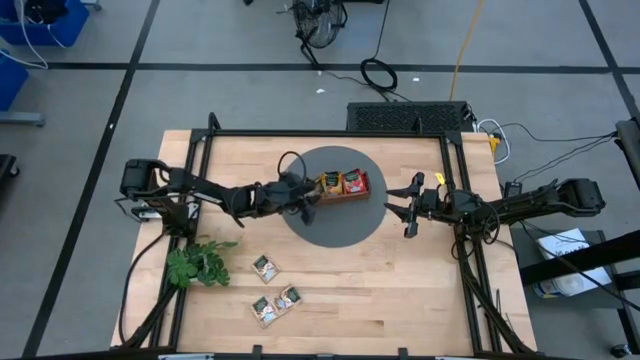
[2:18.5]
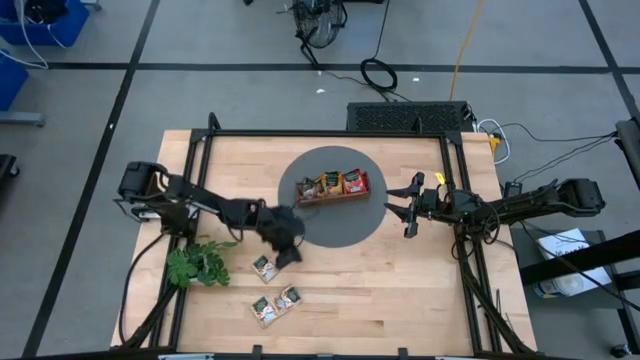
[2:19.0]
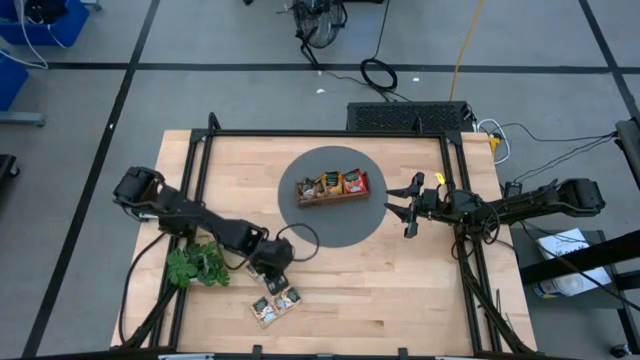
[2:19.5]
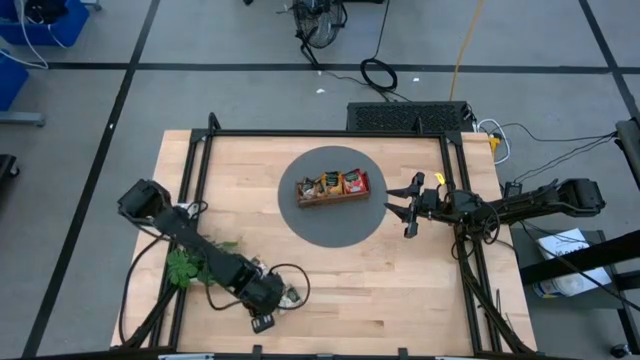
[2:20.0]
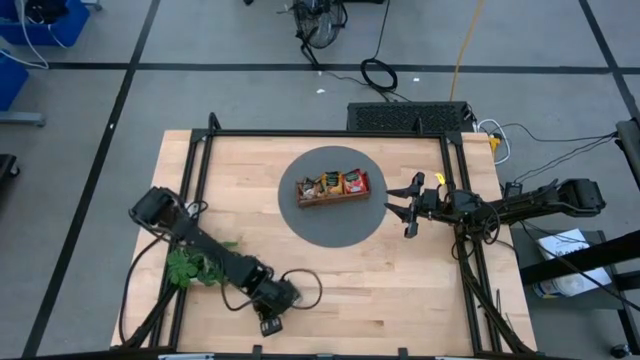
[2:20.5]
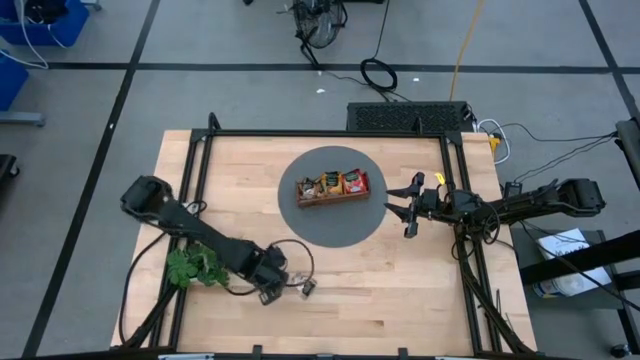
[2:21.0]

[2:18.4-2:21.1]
Task: Pick & Place Tea
Adjust the brown tea bags

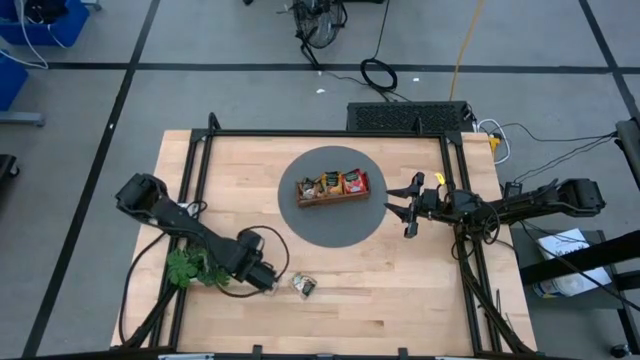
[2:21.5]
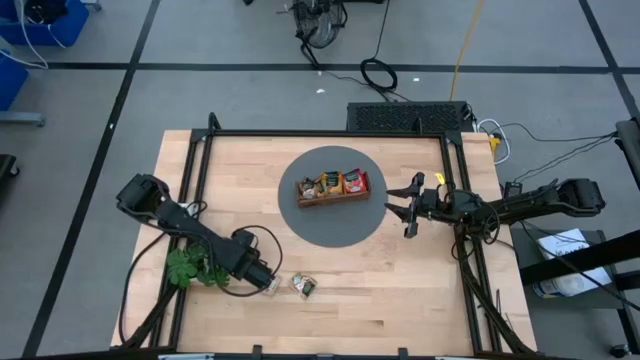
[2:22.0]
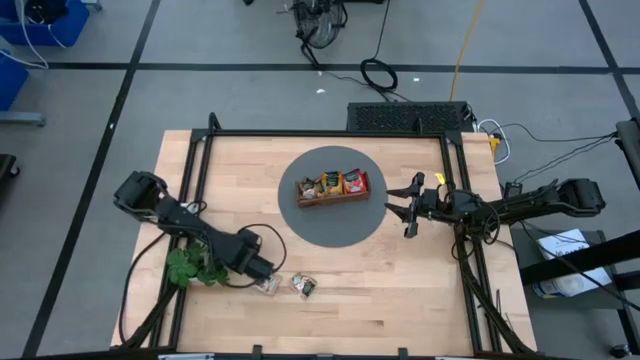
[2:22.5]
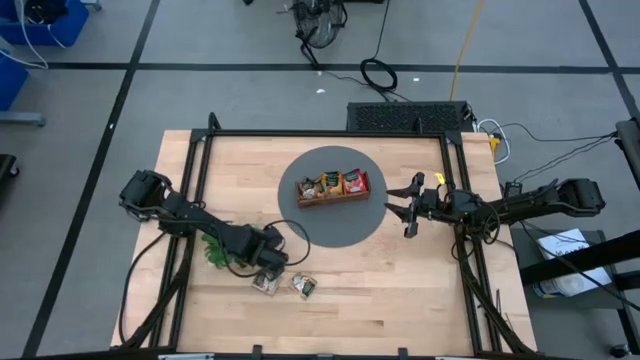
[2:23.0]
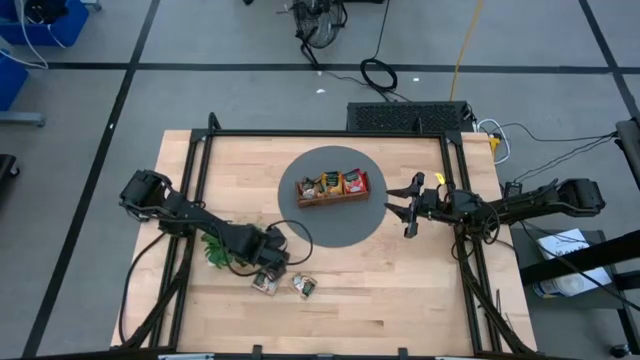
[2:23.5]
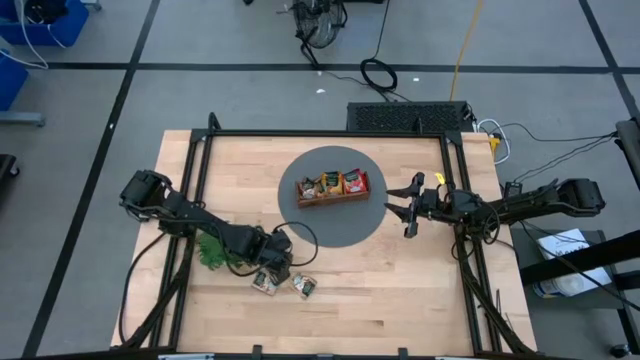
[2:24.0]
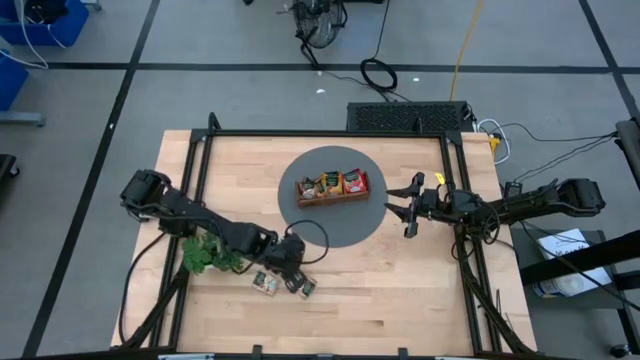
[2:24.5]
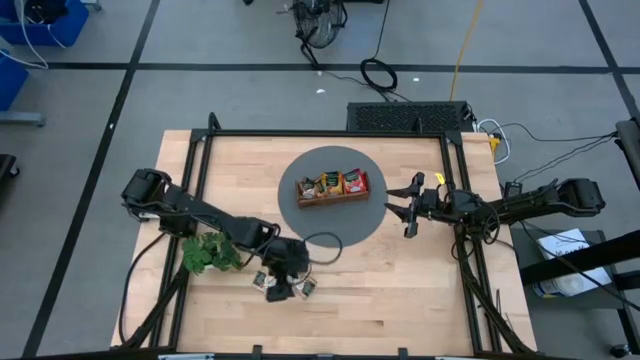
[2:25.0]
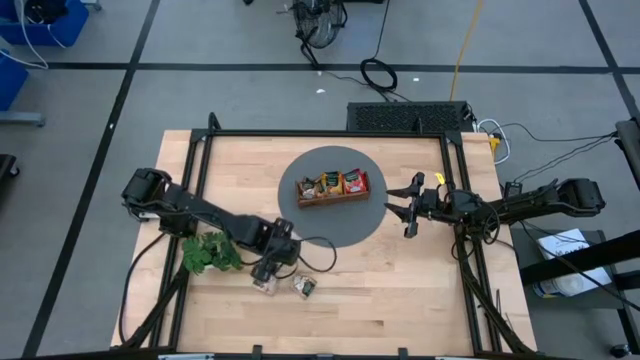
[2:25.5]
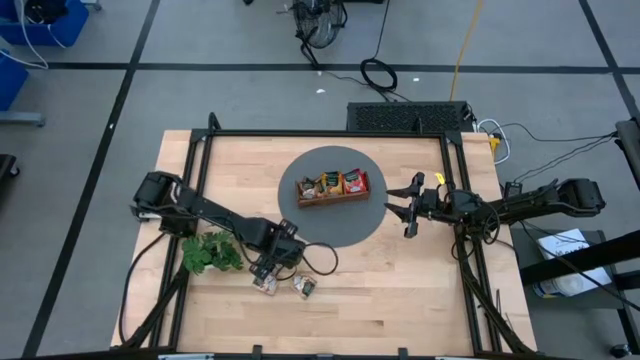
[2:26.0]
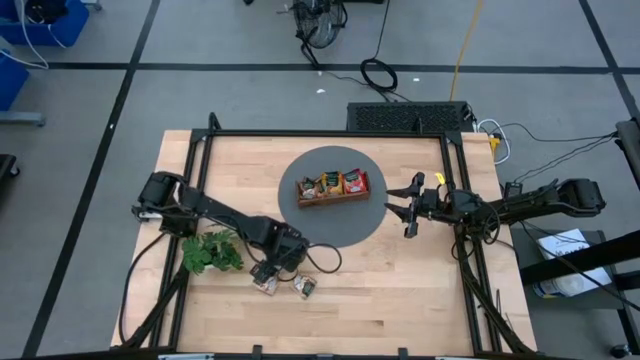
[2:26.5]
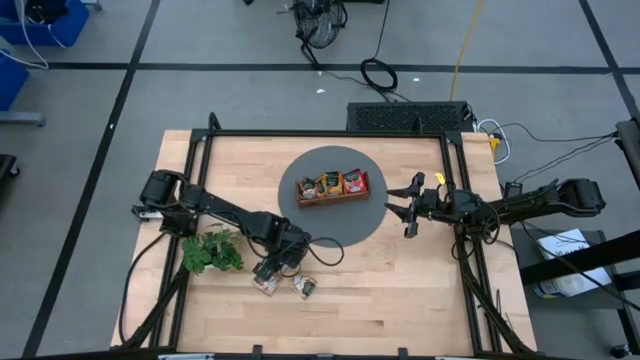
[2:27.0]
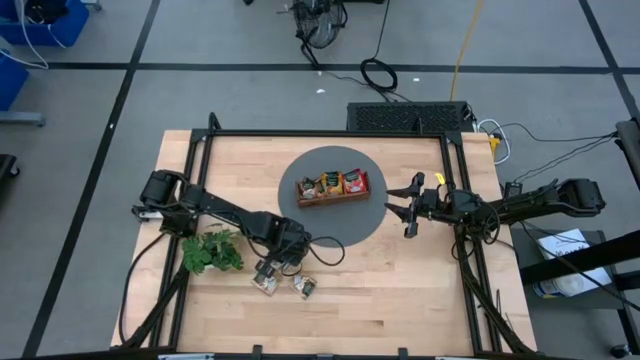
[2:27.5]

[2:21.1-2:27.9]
Put the brown tea bag into the left section of the wooden organizer

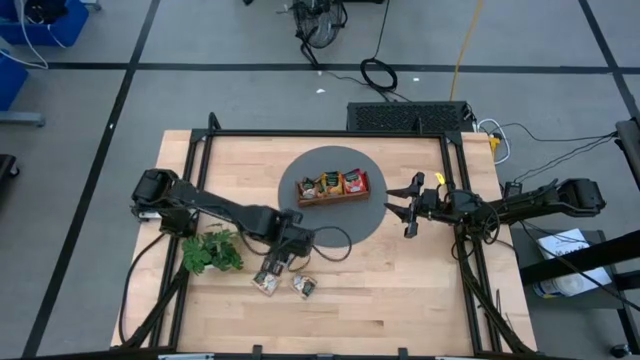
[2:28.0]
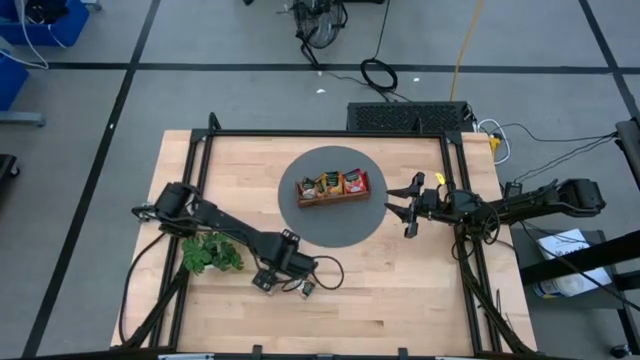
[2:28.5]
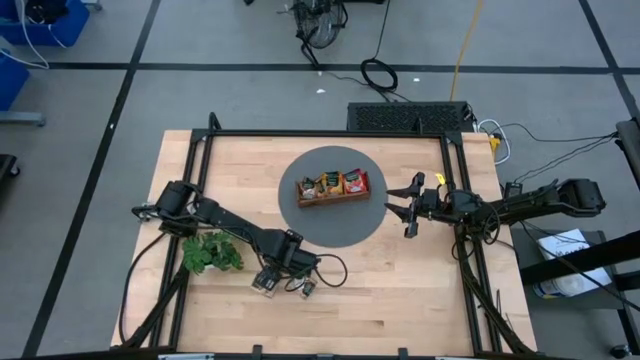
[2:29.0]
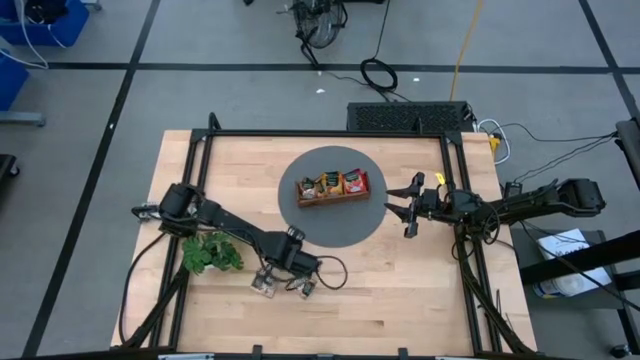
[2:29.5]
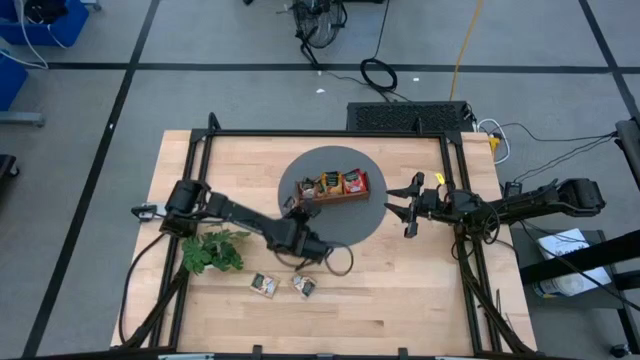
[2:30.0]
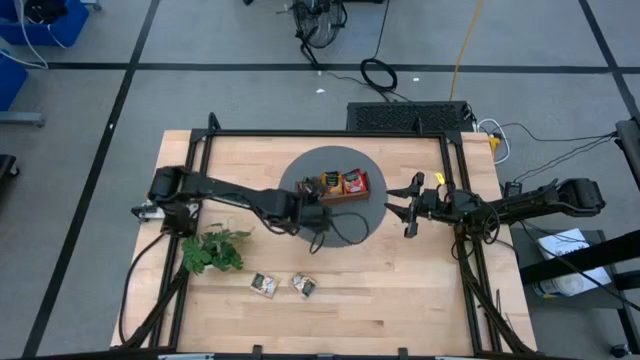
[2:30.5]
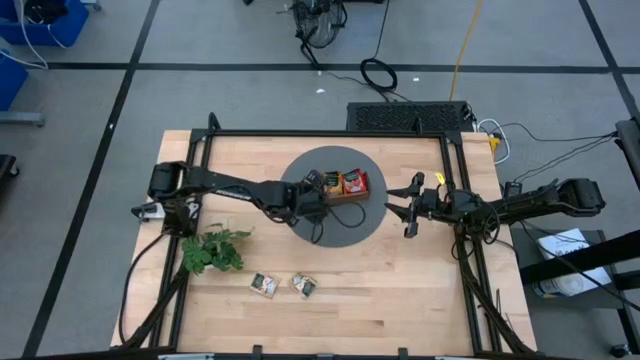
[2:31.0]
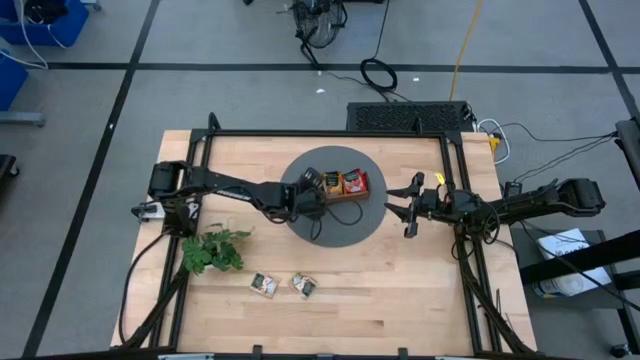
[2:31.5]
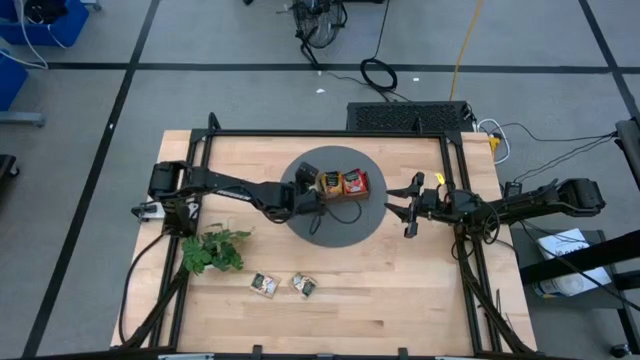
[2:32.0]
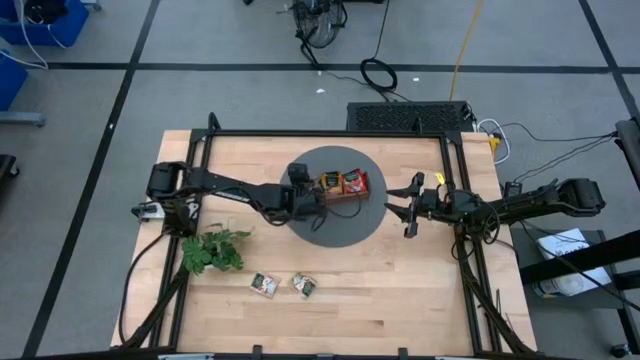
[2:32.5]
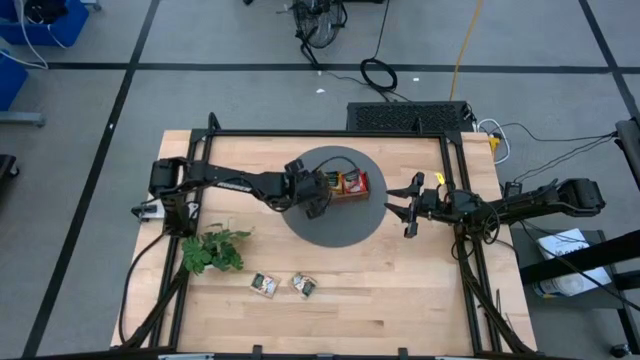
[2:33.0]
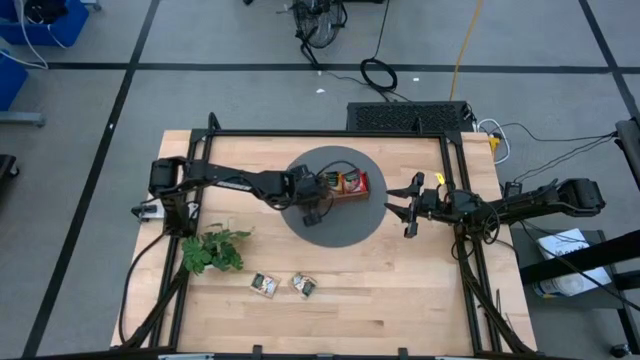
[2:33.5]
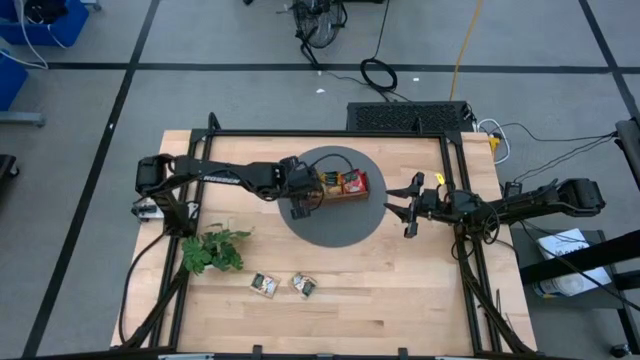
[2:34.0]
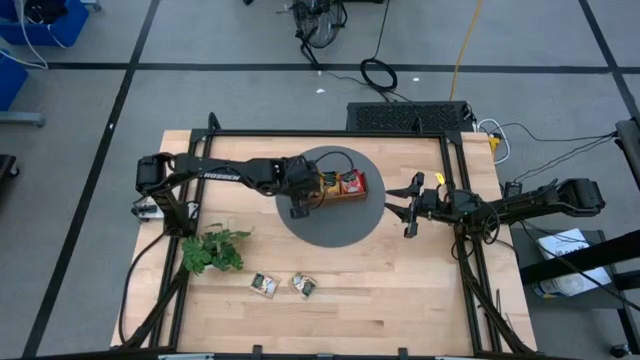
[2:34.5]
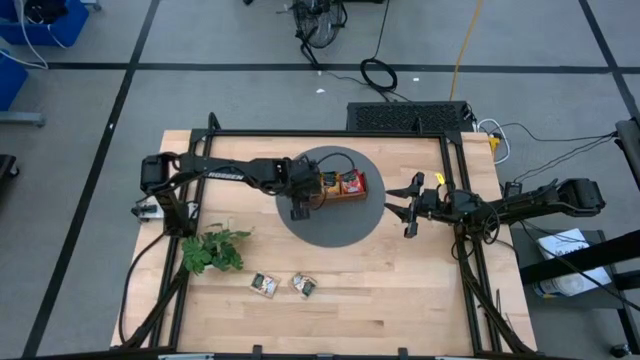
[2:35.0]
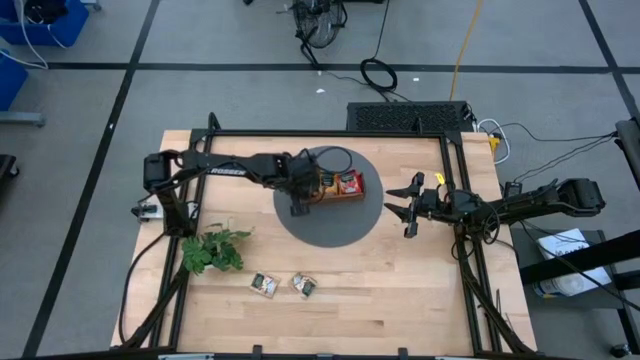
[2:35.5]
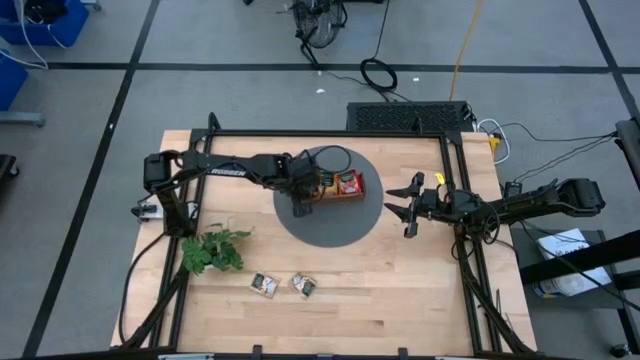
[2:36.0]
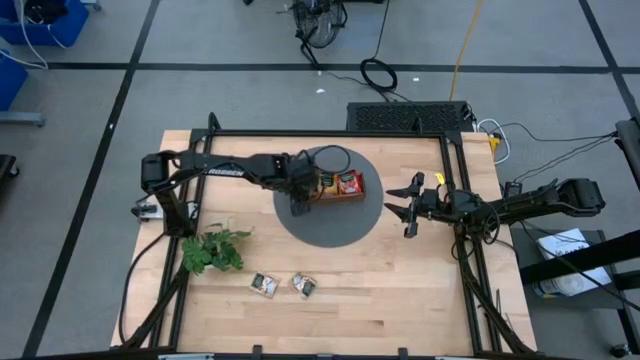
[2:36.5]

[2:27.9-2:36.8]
Put the brown tea bag into the left section of the wooden organizer

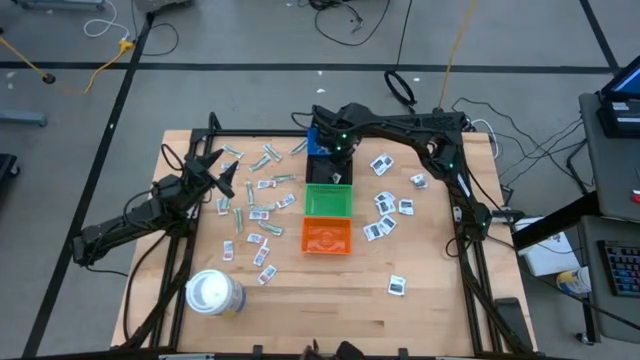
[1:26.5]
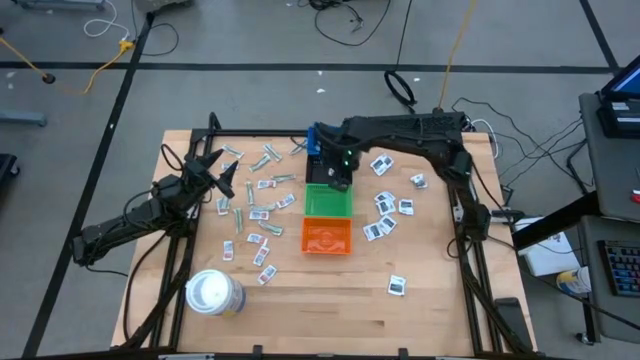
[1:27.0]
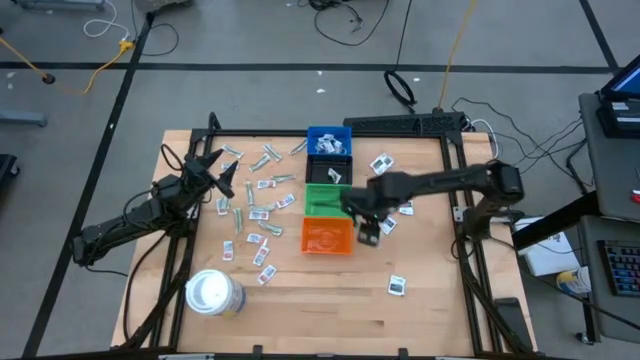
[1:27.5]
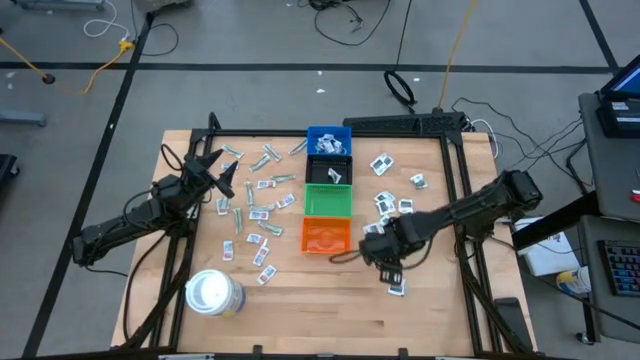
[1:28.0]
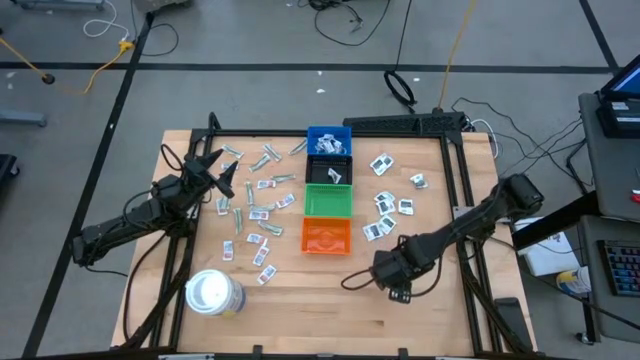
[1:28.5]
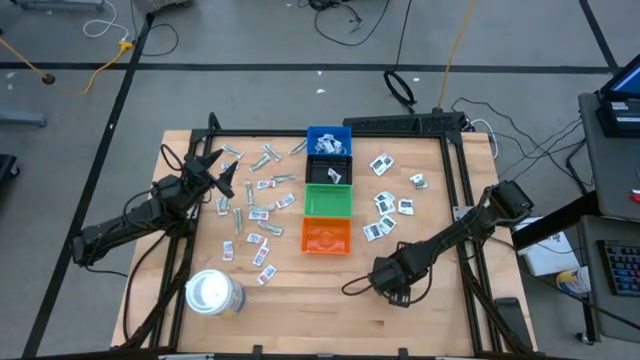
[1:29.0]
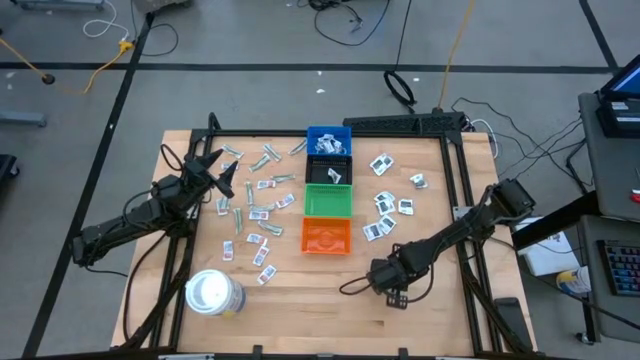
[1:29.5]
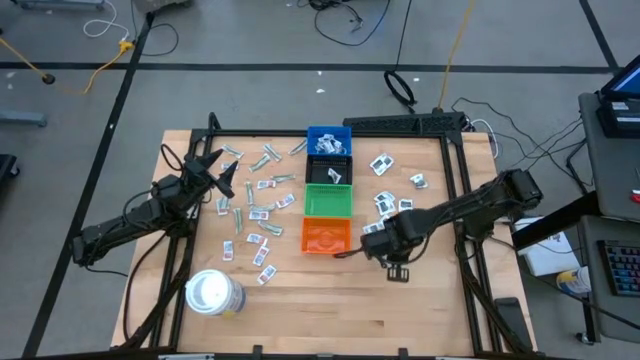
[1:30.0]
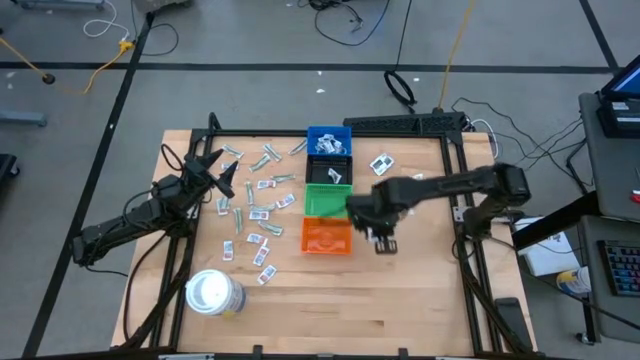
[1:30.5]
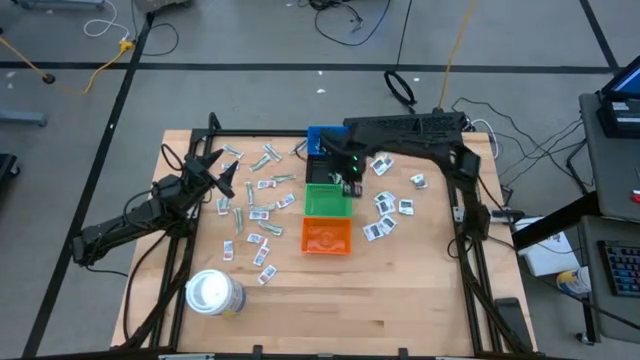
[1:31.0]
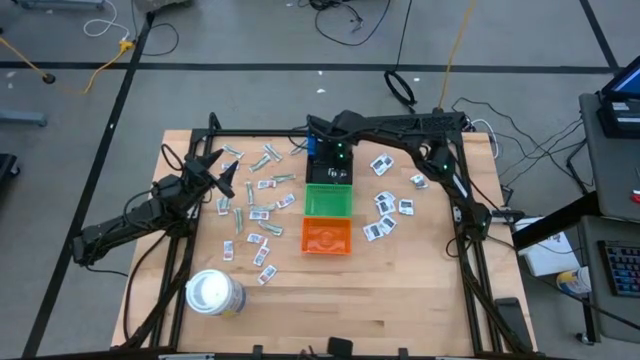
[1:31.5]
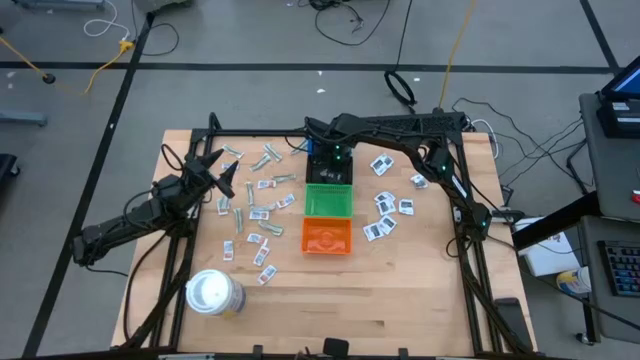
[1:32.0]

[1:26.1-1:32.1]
Task: Pick & Place First Aid Supplies
Put the black towelette pack into the black bin
